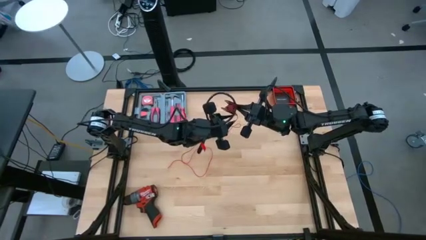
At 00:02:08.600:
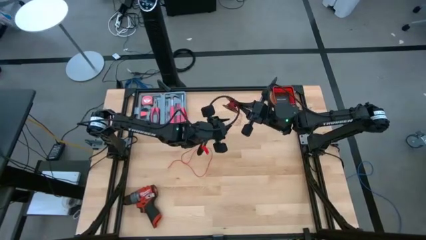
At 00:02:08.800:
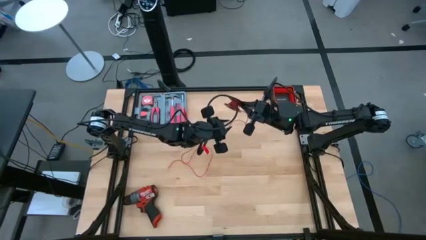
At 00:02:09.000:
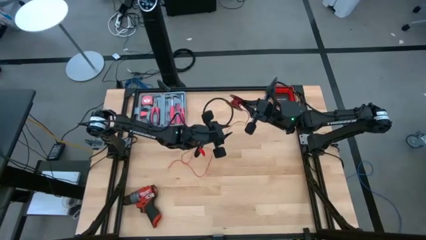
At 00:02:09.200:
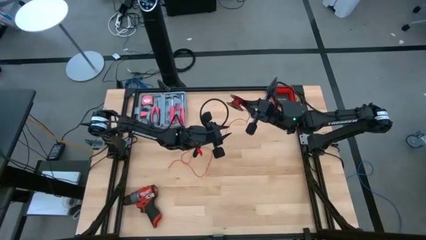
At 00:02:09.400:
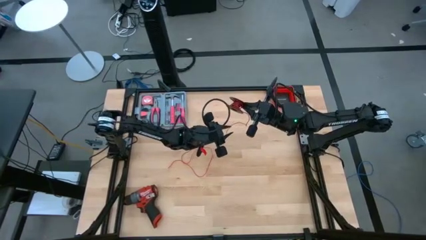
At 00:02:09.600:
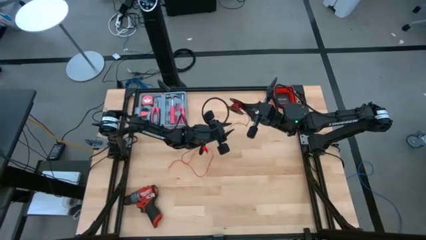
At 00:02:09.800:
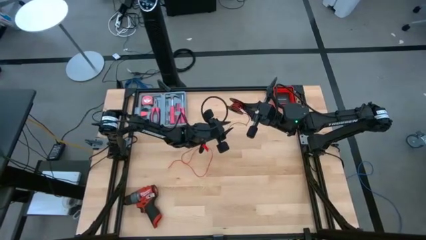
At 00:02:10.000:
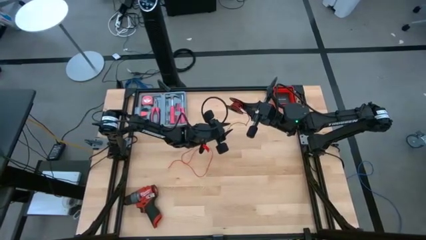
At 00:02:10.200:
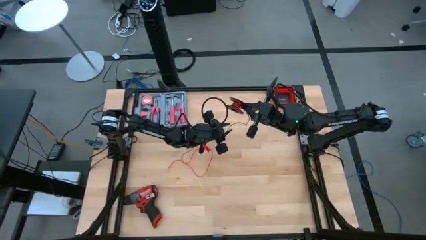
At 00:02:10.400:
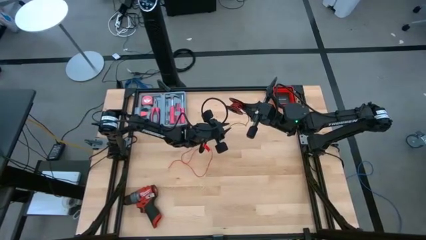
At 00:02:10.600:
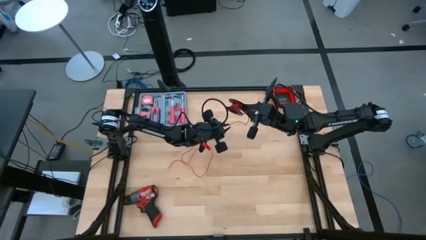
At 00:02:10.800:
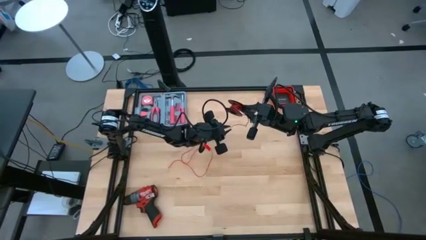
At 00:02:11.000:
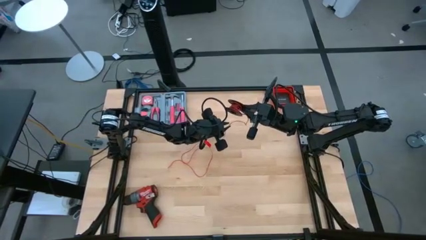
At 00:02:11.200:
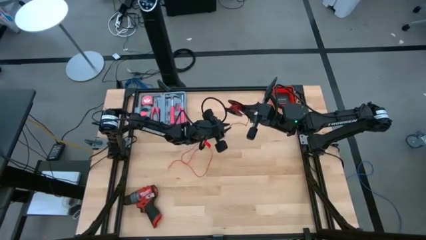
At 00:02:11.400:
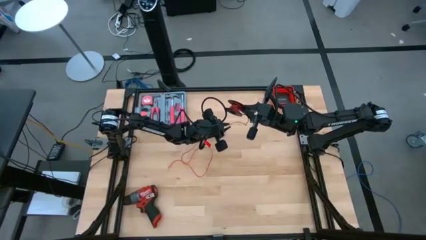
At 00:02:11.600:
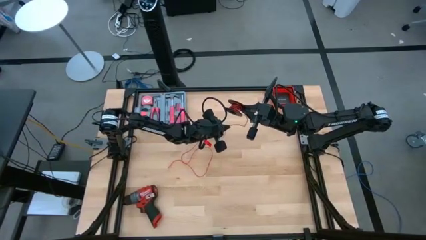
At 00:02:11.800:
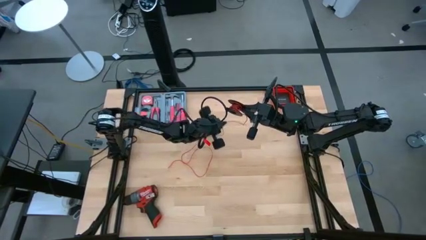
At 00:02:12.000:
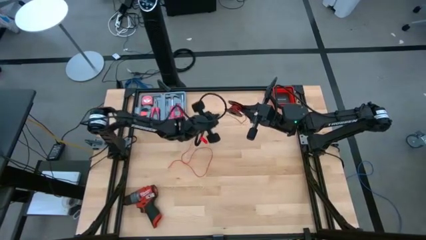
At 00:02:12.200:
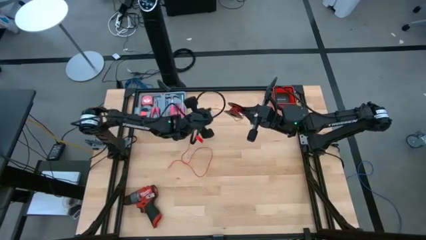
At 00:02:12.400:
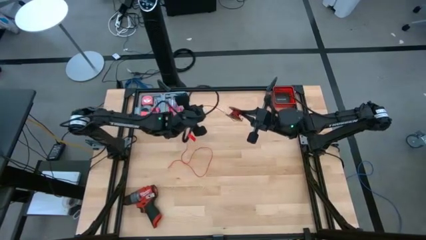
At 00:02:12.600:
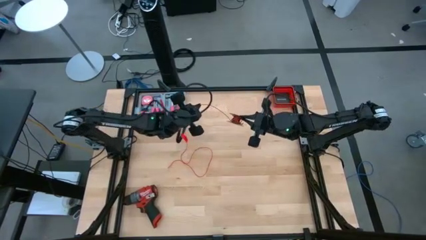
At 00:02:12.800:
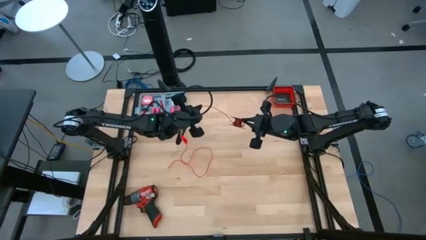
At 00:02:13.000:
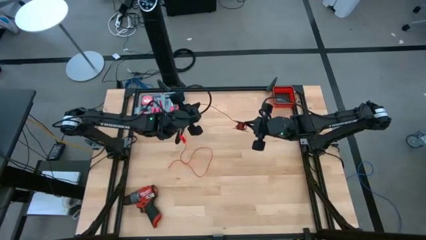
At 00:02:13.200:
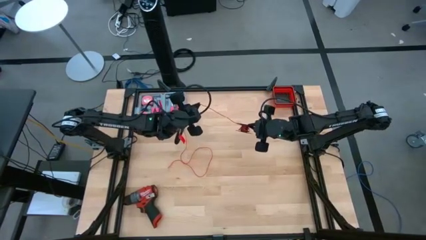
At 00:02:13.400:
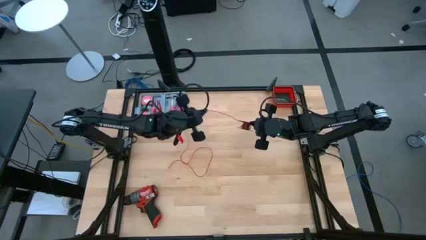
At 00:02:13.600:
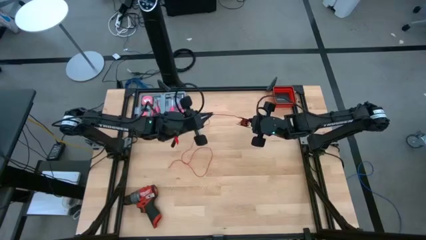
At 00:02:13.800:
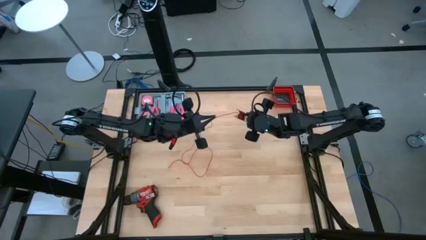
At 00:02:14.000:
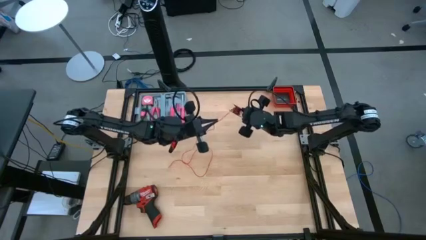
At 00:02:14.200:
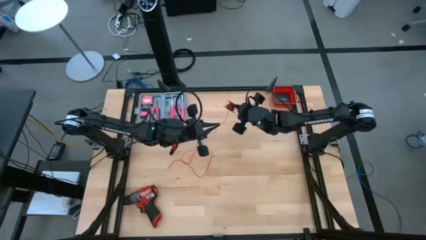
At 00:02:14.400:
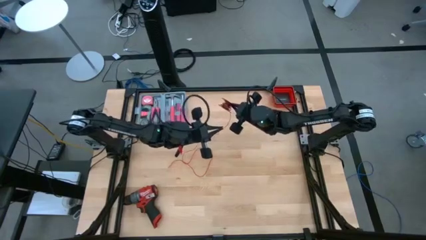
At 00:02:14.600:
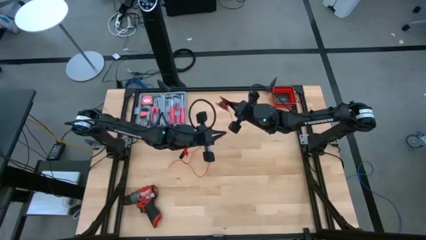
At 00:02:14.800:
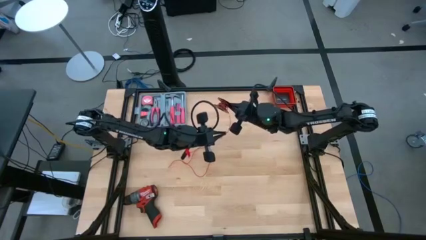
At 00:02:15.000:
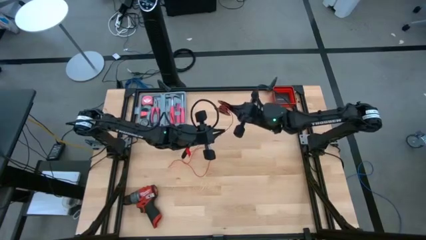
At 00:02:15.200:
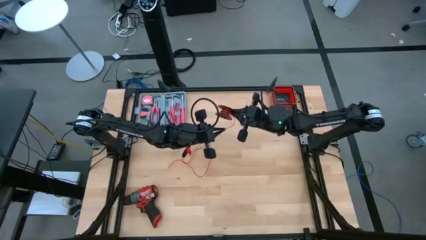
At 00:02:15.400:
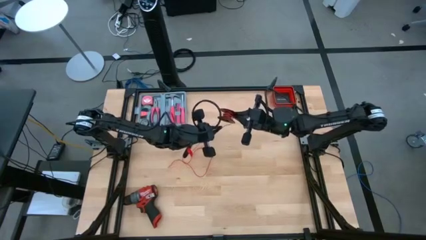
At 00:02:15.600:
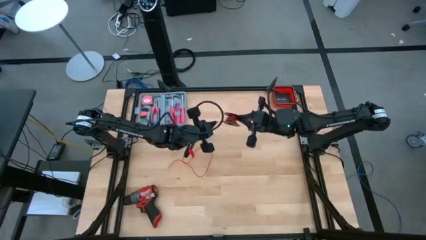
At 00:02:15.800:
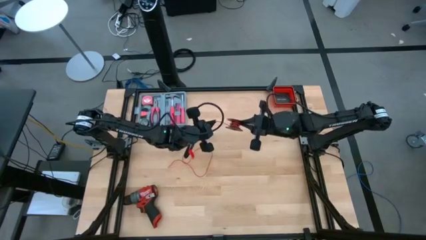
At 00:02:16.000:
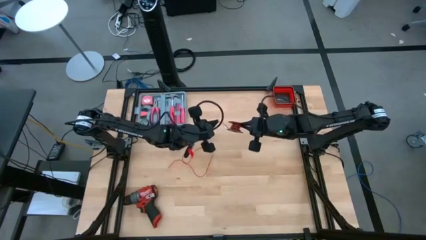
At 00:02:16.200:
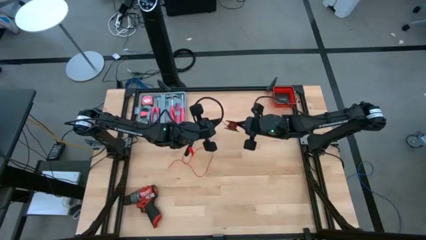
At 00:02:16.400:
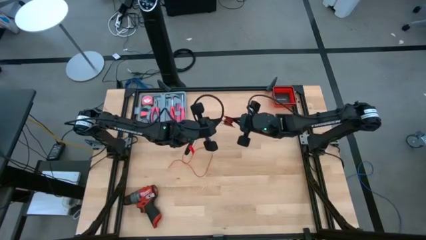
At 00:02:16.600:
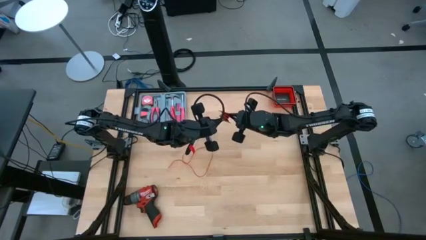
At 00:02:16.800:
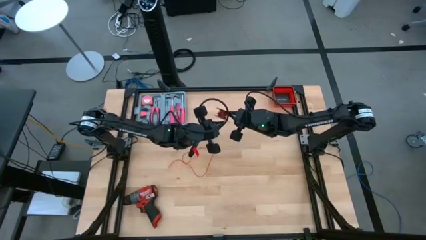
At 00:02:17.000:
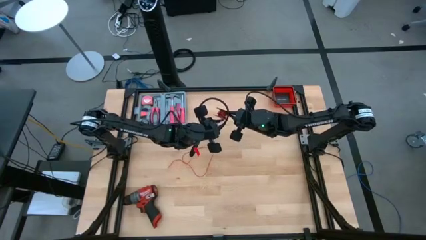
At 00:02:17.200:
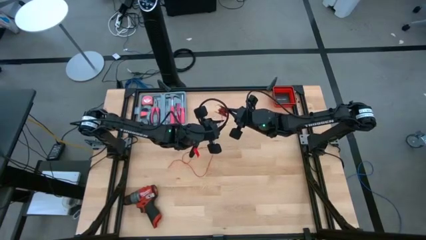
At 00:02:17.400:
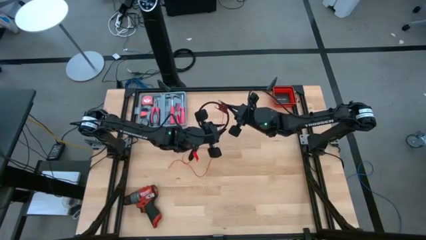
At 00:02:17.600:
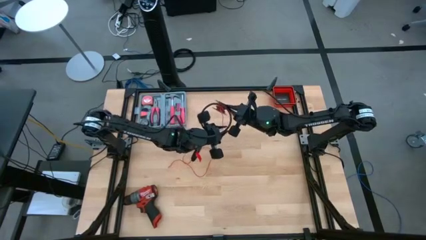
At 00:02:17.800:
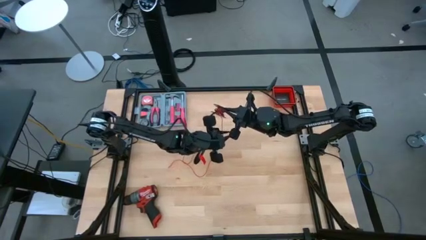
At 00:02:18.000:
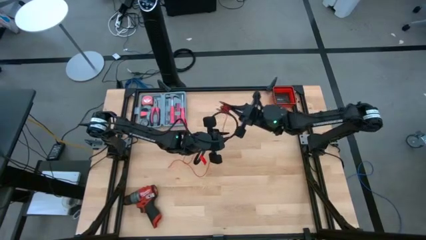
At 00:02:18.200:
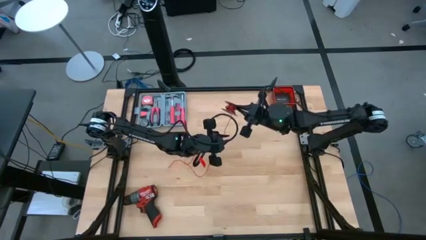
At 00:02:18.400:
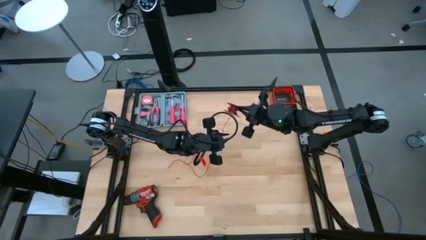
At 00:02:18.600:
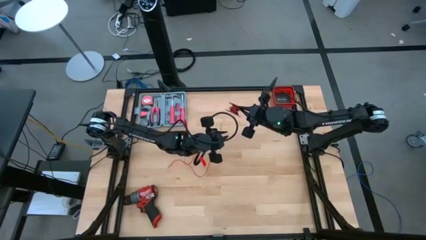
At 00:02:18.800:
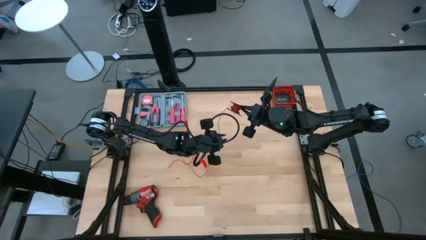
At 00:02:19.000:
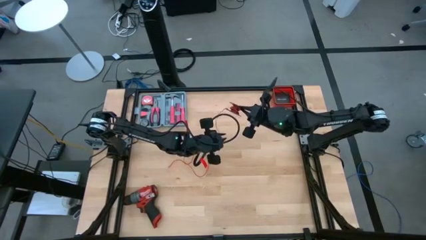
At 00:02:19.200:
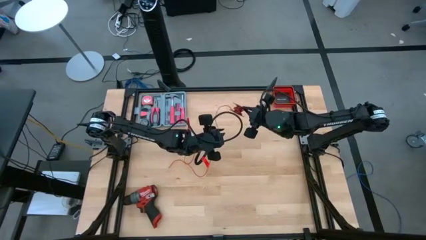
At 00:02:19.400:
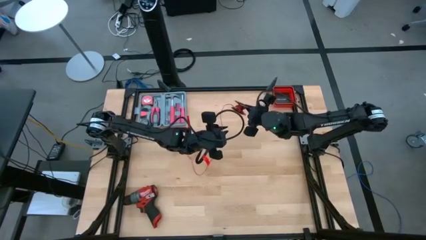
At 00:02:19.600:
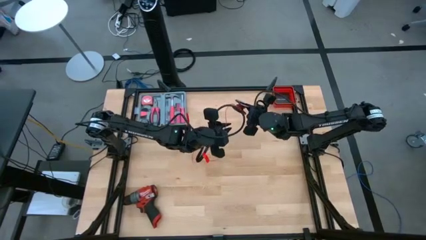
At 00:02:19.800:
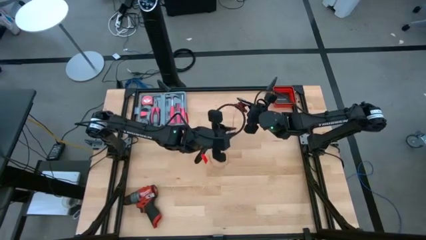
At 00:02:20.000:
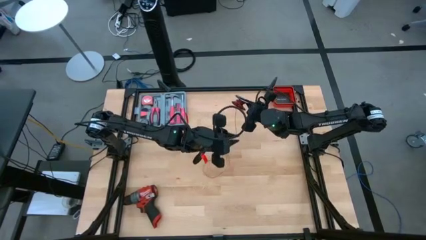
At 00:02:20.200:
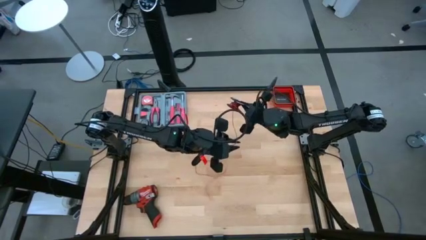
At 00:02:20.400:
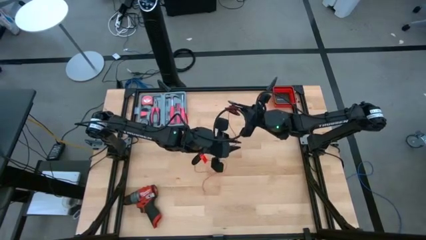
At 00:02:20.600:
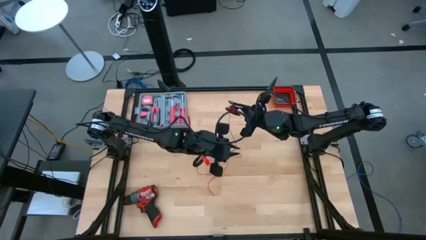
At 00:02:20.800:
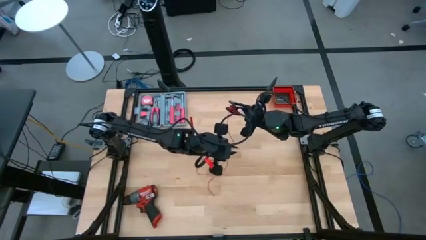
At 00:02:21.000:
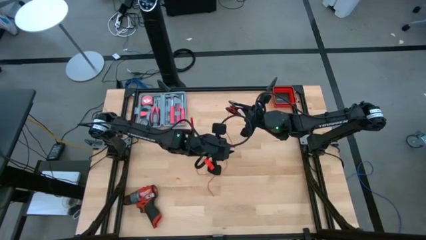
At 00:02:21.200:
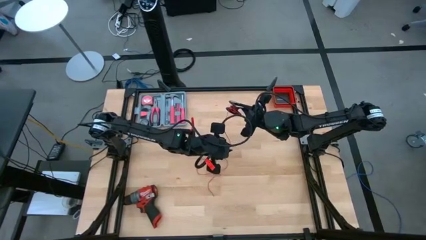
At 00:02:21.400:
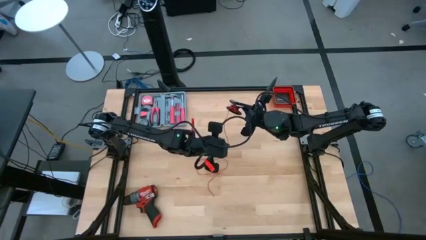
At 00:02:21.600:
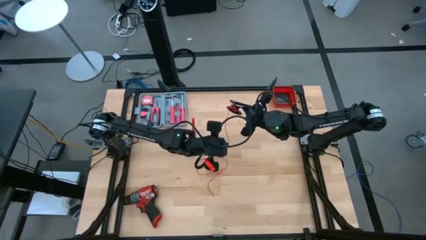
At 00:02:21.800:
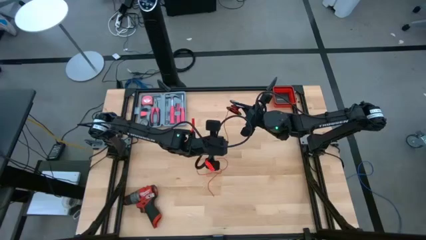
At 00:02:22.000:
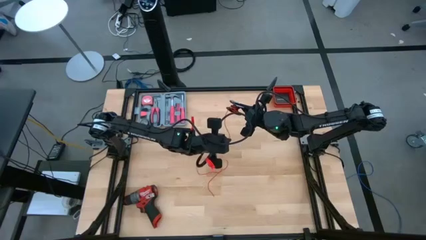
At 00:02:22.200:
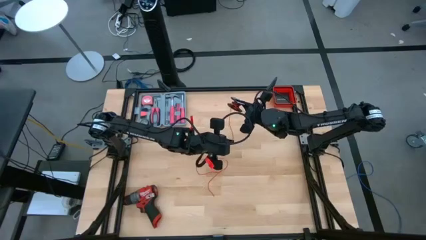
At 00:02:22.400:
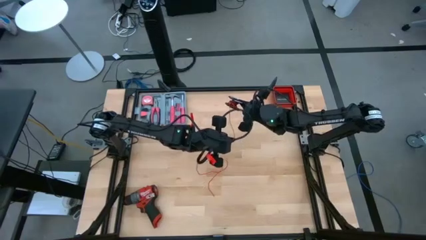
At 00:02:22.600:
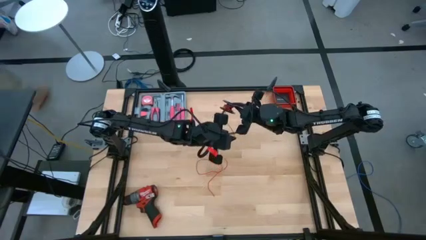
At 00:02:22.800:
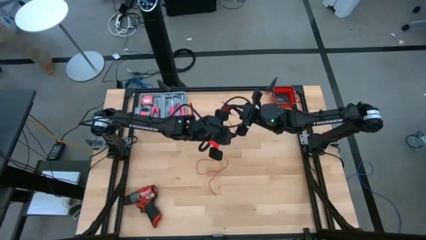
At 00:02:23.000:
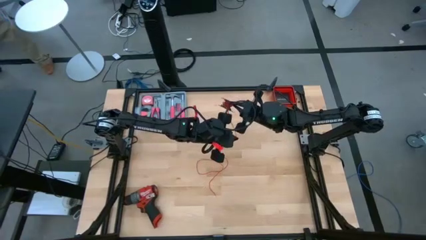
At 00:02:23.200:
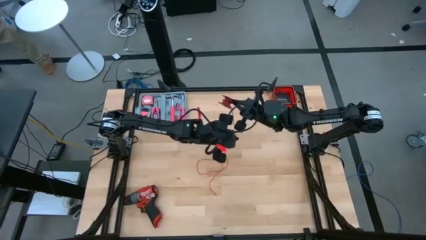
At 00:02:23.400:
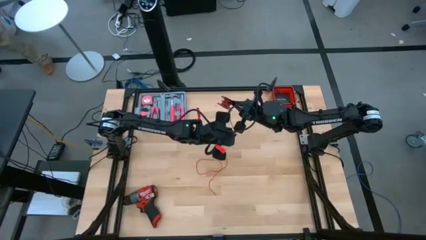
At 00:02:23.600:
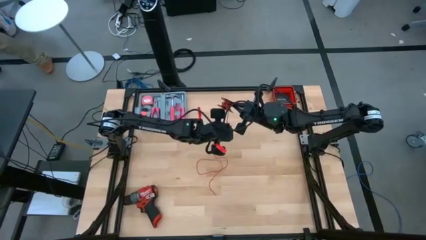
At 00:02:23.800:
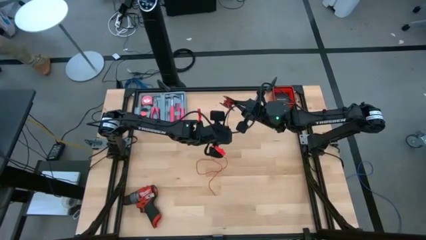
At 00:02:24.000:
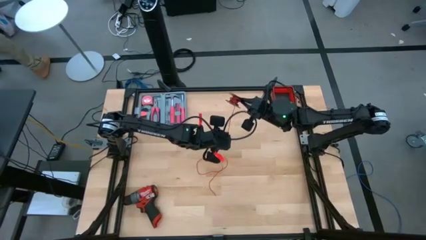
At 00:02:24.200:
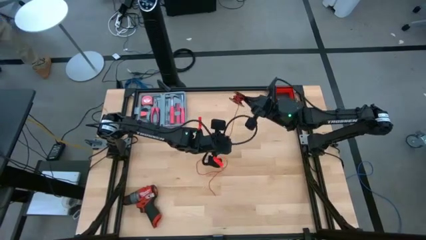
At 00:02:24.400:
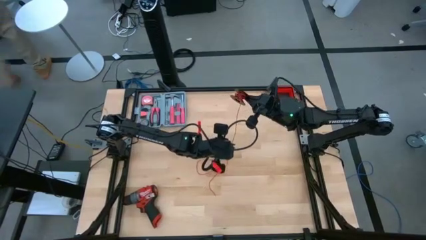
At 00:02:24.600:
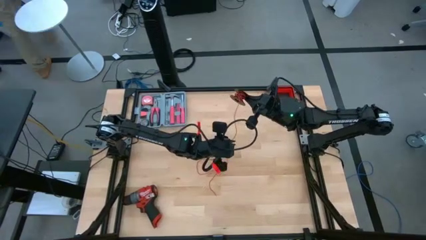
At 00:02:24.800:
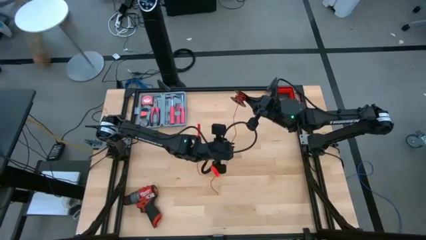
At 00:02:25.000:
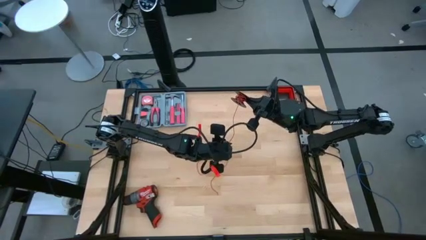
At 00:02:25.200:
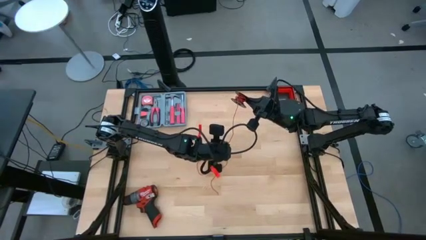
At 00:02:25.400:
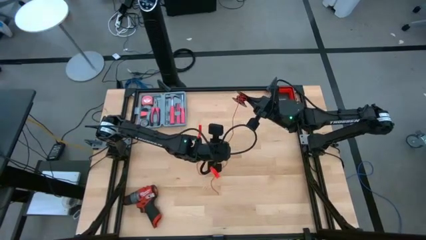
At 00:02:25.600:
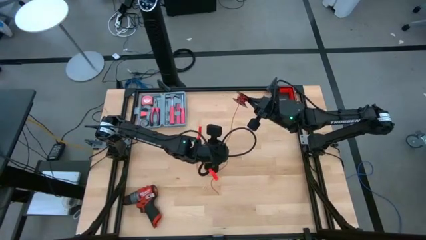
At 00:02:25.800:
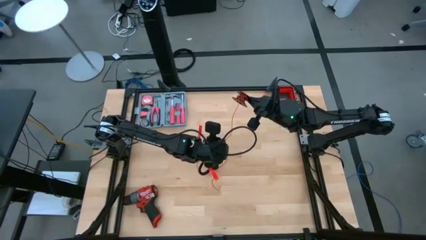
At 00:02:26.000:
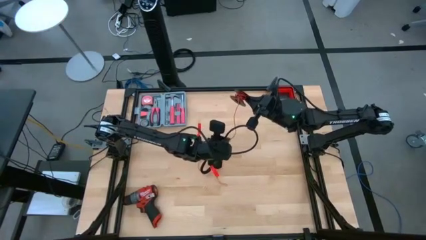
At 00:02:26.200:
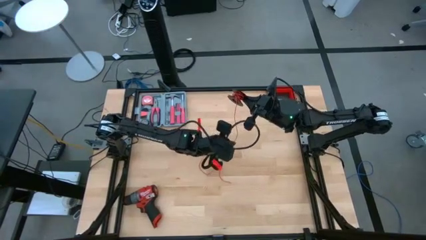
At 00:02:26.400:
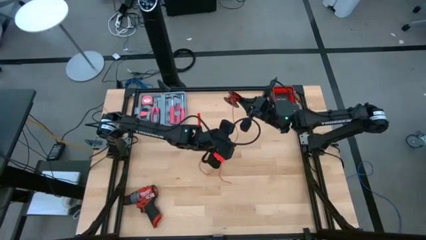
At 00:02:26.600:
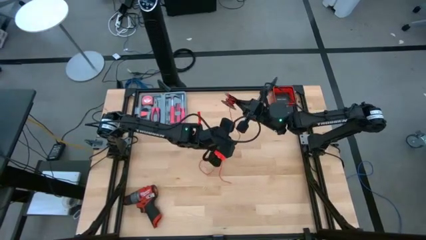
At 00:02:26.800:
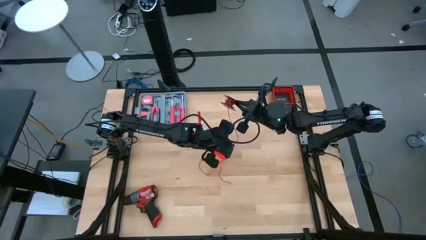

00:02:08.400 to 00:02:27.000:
Task: Coil cords
Coil the red wire on the black spool
